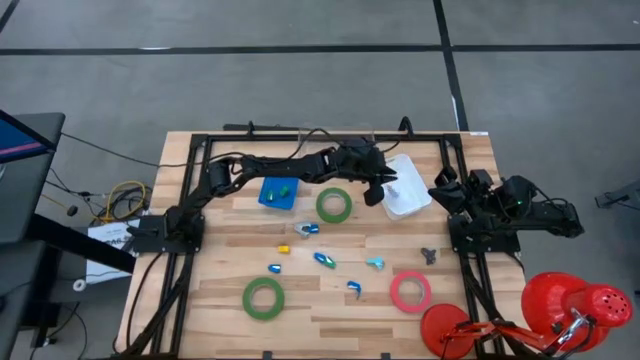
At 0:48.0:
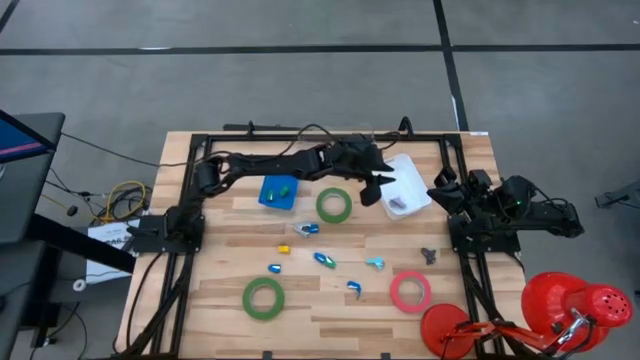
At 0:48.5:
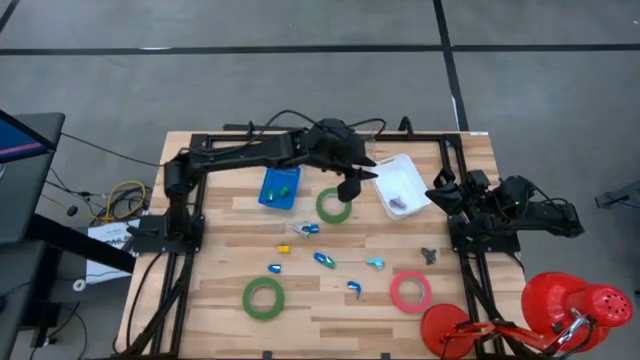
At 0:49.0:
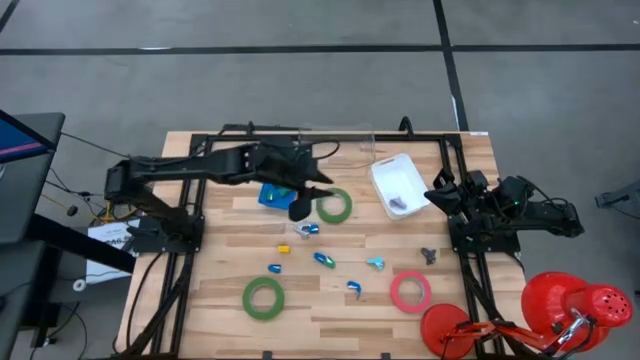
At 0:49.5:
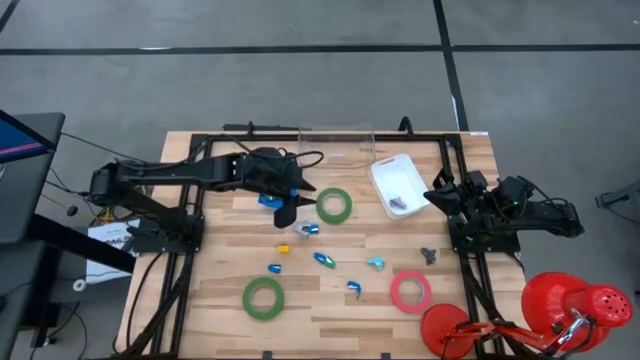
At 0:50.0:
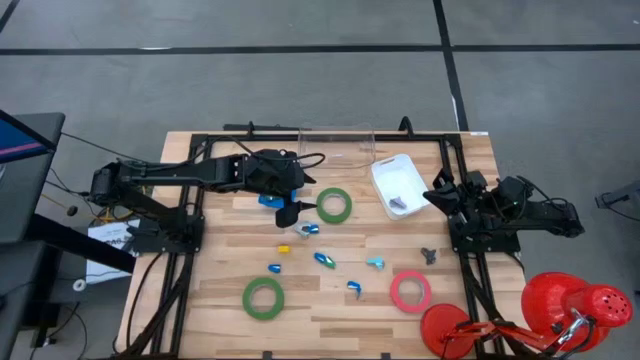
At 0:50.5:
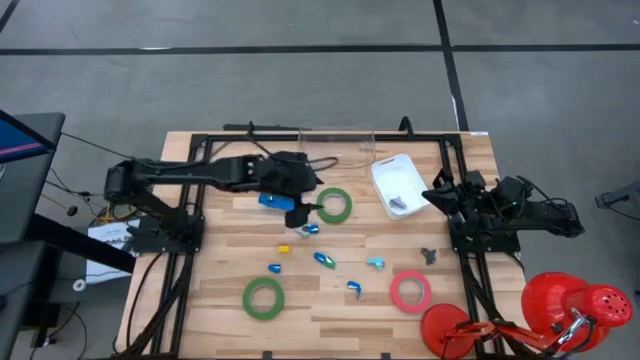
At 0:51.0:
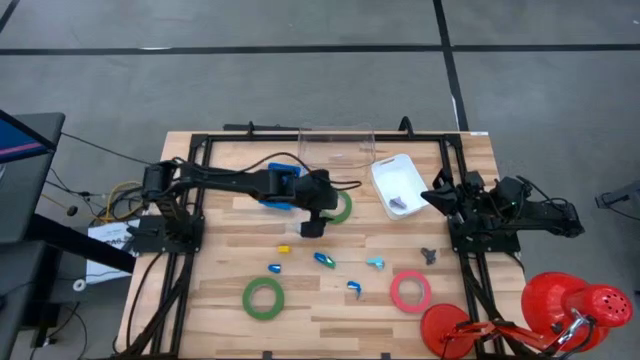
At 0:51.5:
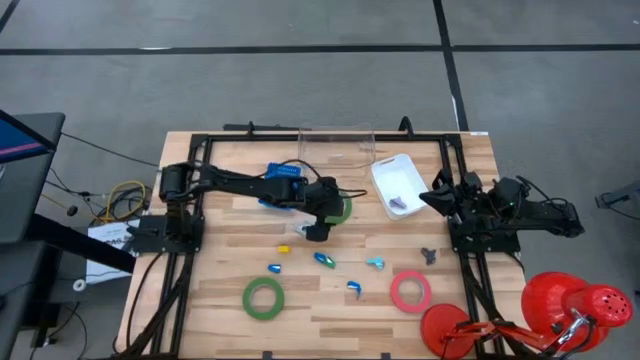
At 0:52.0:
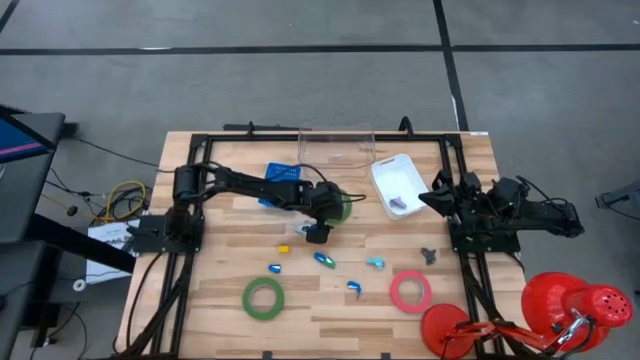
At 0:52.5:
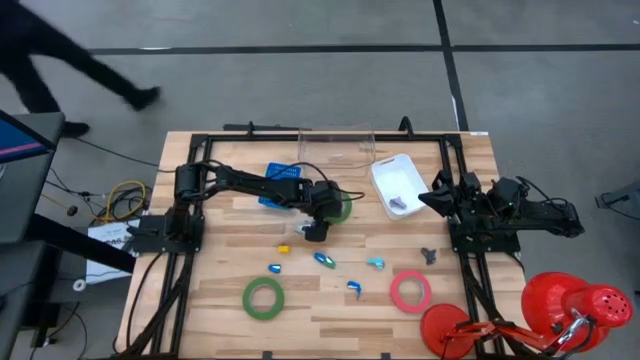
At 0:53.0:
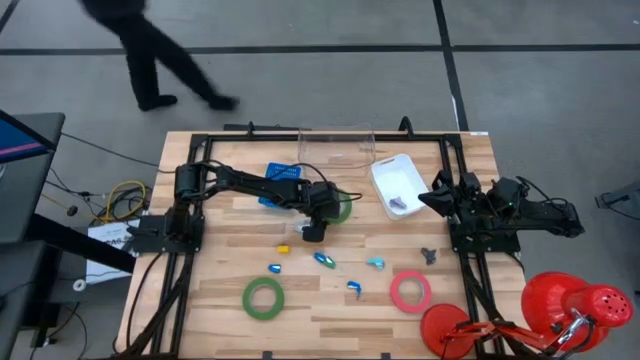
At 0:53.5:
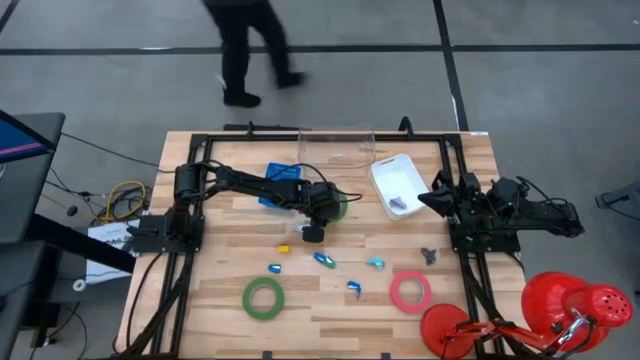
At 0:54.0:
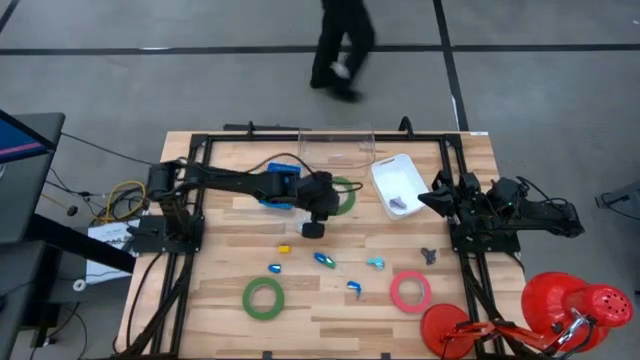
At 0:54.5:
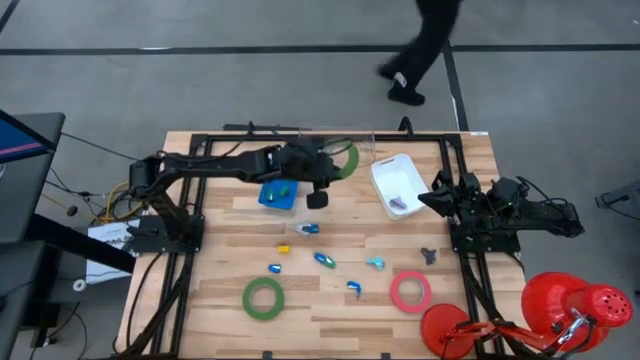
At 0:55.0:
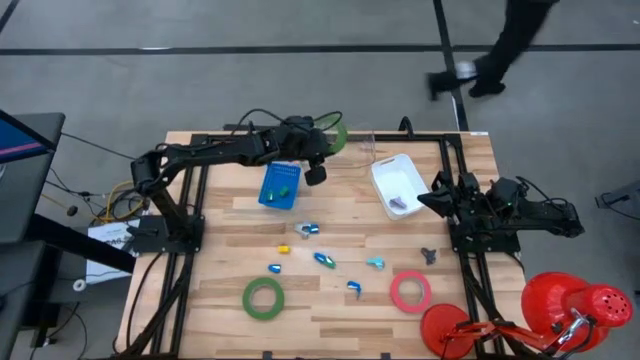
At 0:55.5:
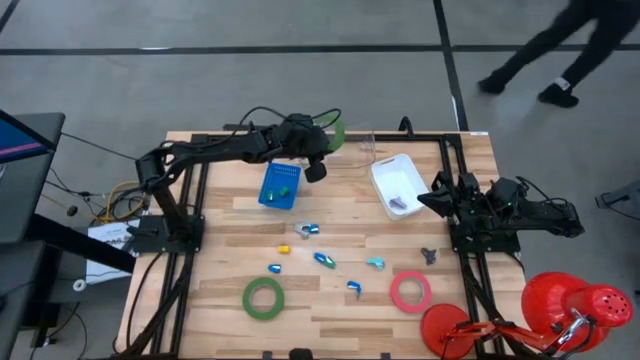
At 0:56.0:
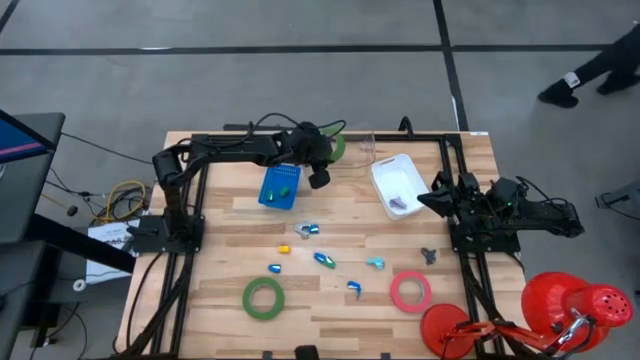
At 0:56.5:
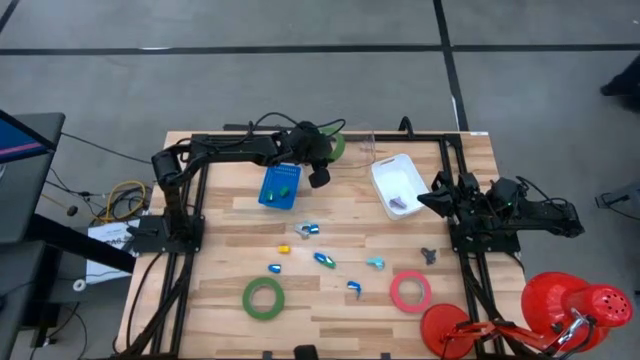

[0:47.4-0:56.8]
Task: Pick and place Stapler, Stapler remover, tape
Put the top green tape into the transparent bin

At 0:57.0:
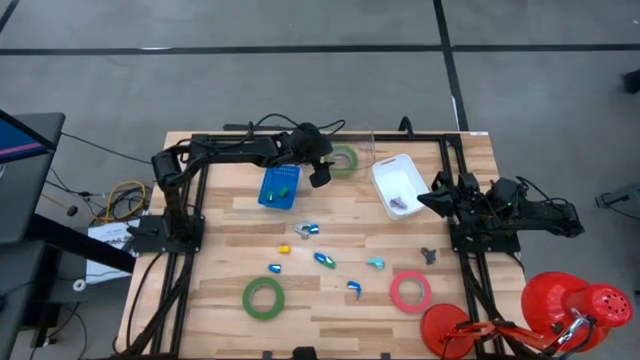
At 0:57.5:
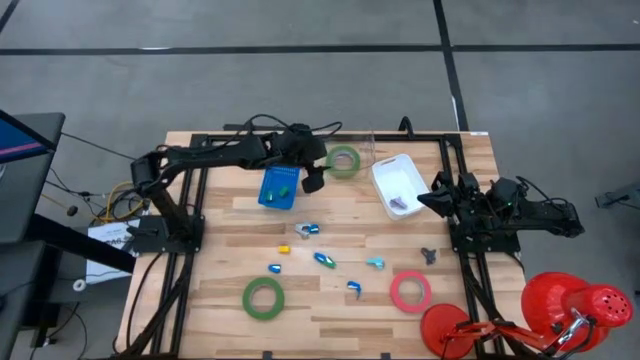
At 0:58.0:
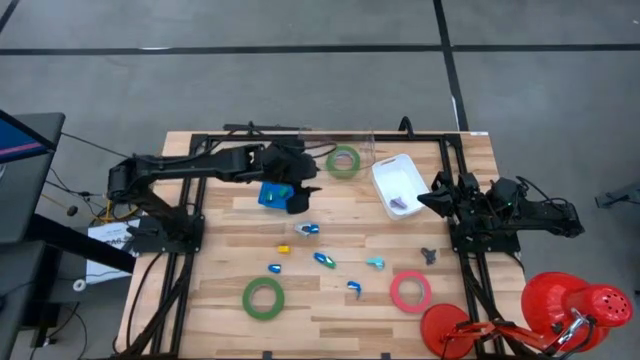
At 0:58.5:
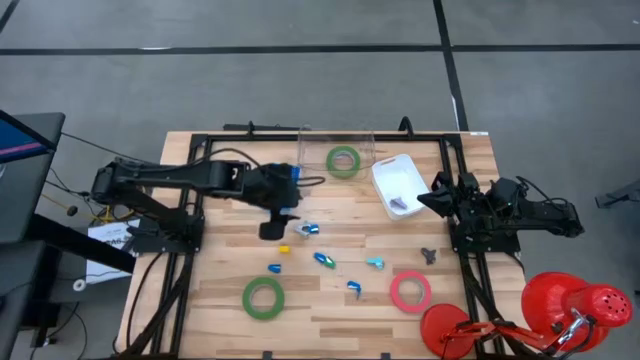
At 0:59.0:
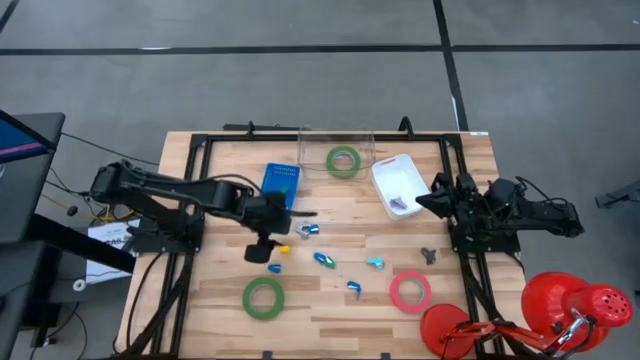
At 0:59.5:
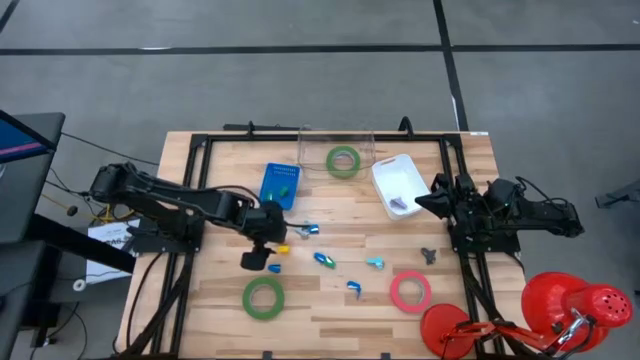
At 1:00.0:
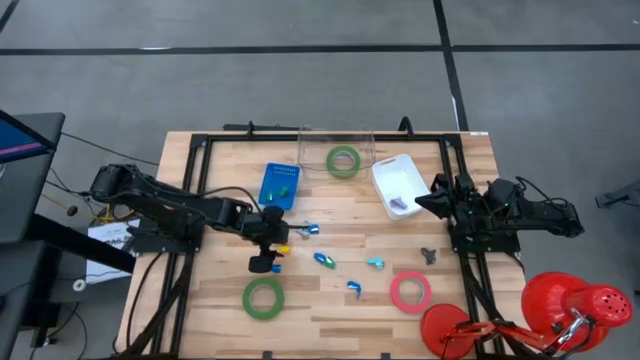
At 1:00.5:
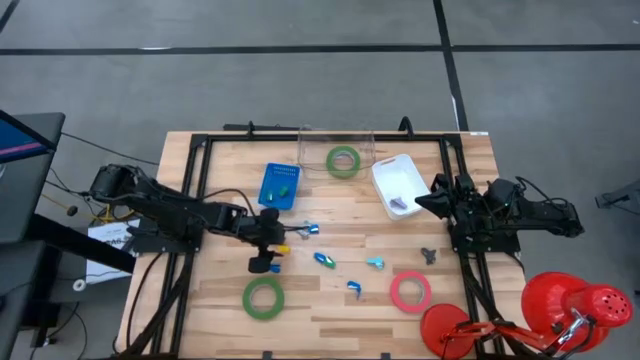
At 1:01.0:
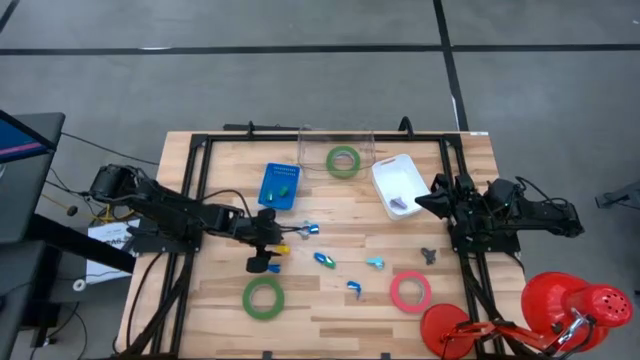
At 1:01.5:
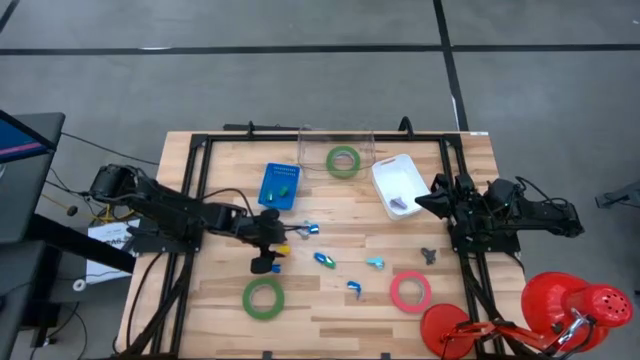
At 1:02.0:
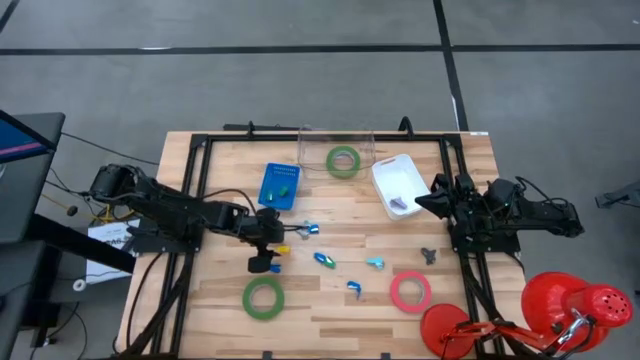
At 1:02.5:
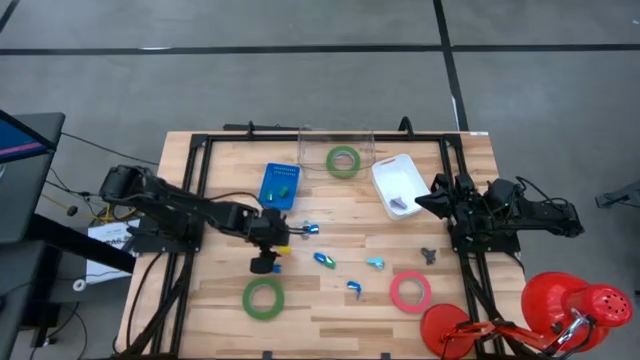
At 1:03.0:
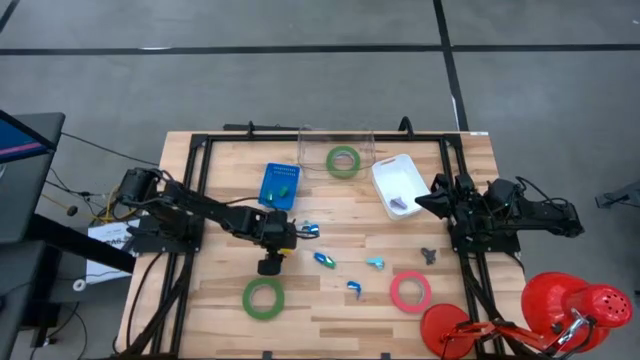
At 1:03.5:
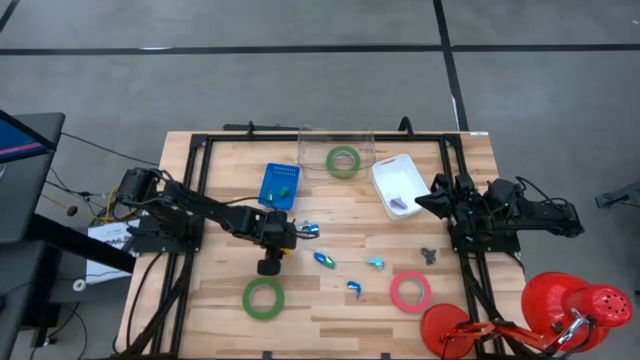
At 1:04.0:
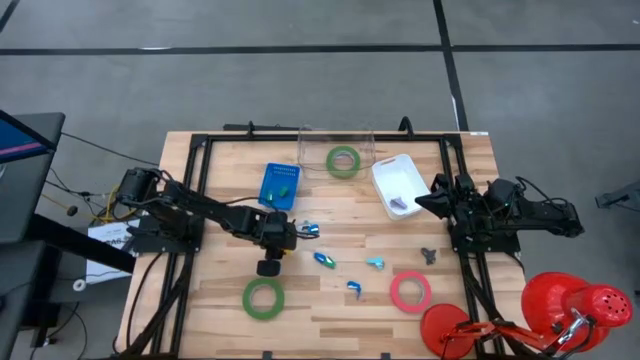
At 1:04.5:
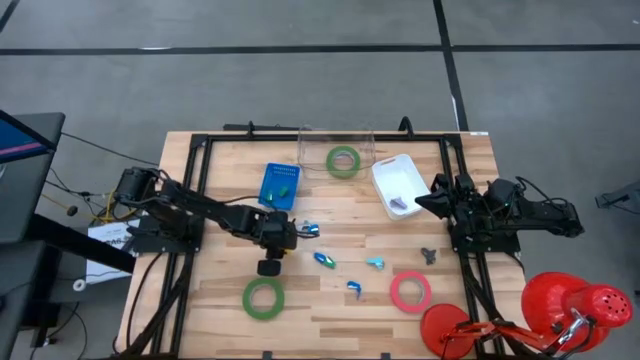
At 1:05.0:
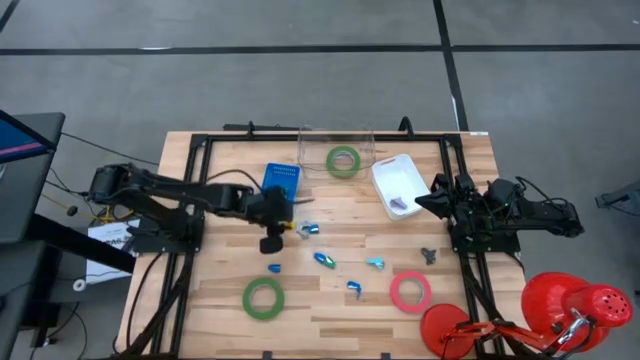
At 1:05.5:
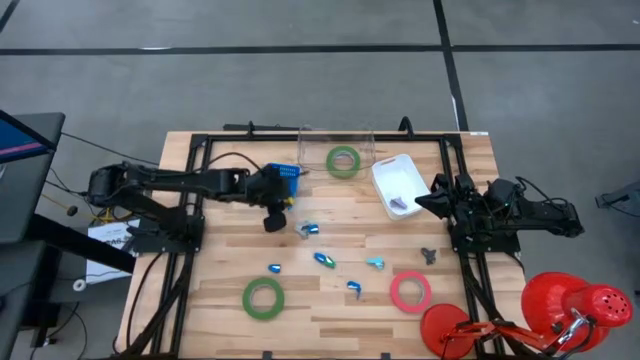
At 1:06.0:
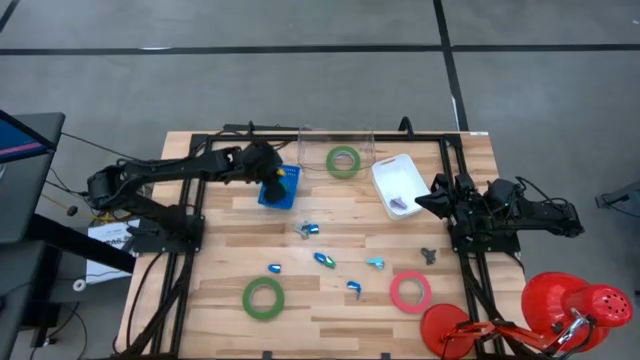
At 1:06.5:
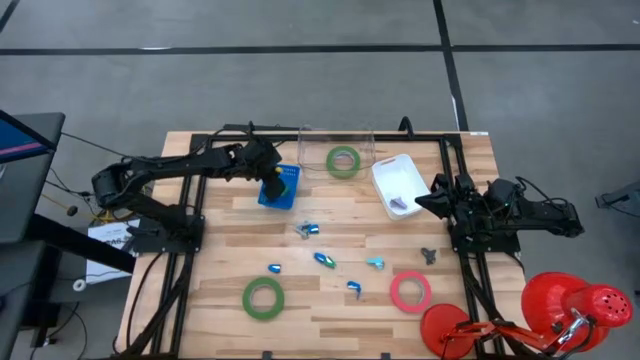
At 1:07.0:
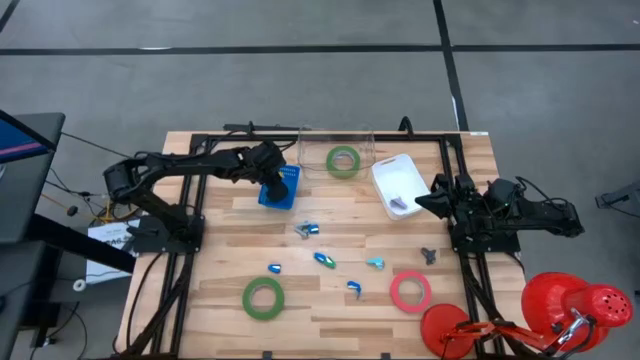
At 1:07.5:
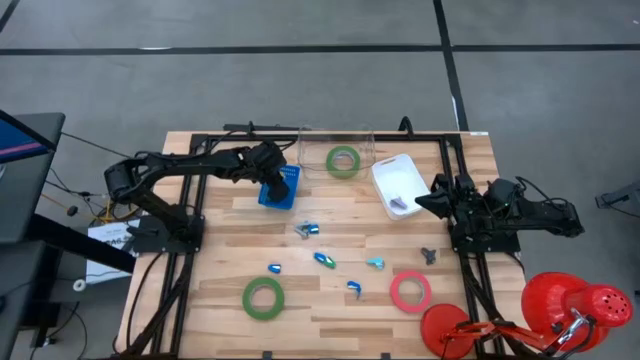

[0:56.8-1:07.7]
Put the yellow stapler into the blue bin

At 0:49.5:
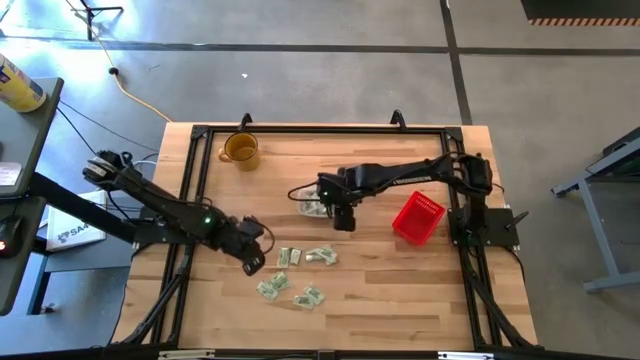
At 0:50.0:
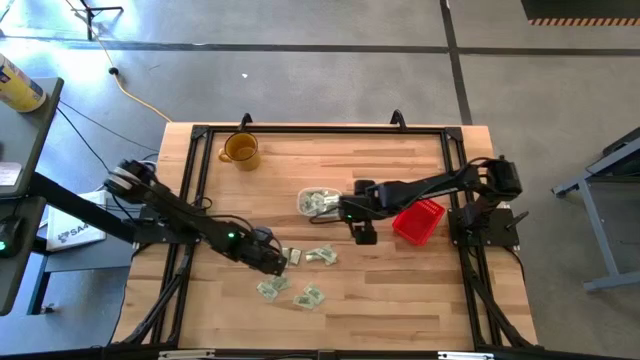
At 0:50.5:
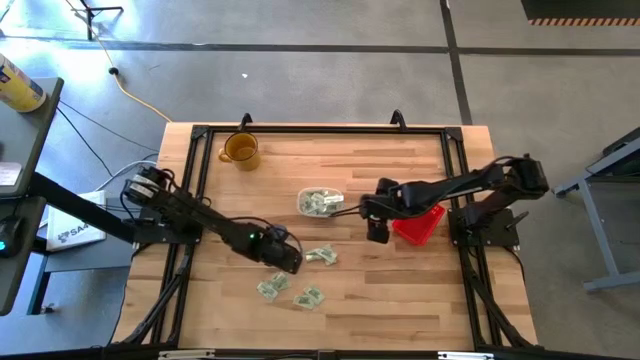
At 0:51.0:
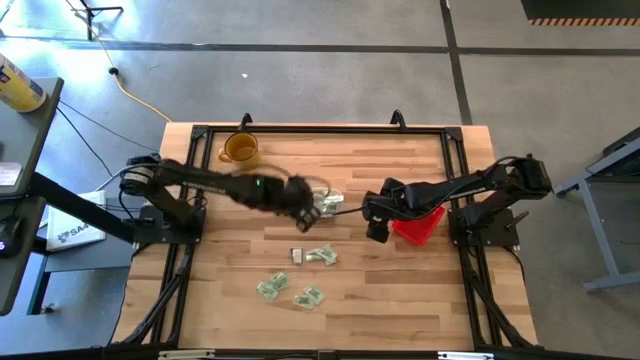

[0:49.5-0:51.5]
Task: Pick and place items into bin
Put the white stevia packet into the transparent bin
